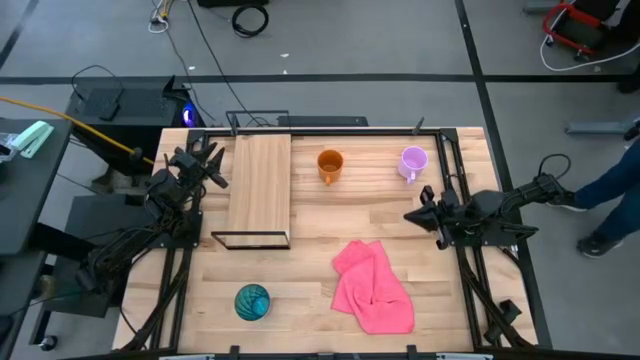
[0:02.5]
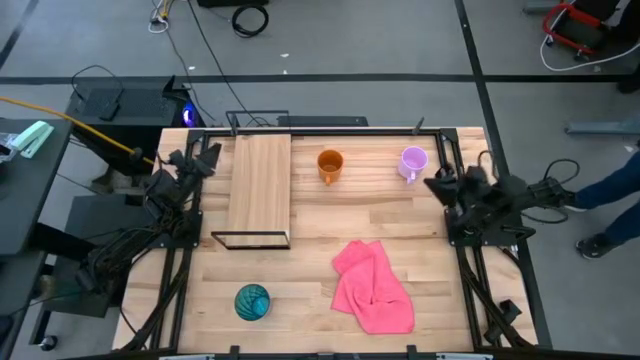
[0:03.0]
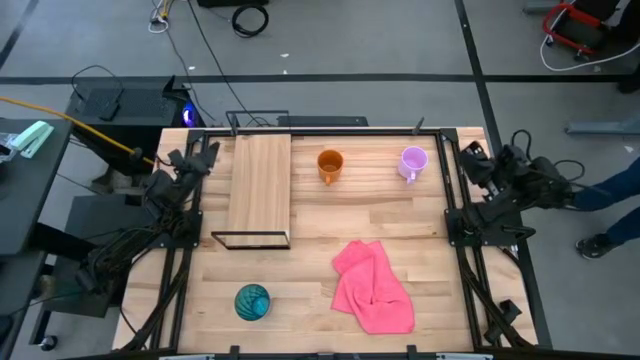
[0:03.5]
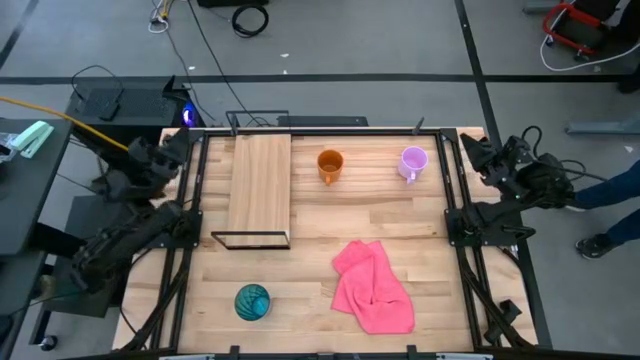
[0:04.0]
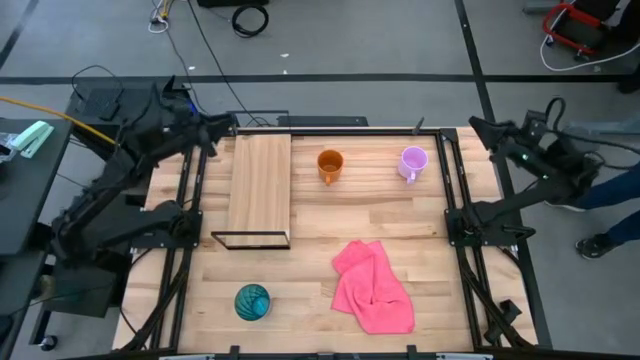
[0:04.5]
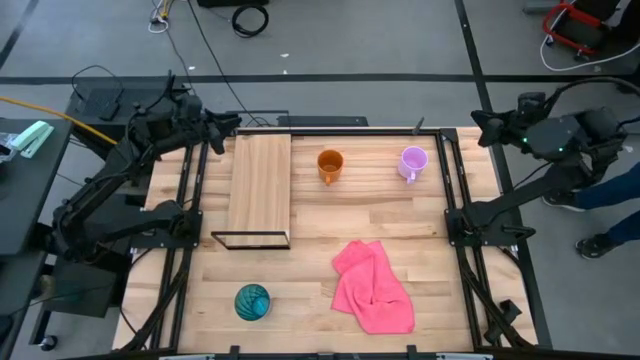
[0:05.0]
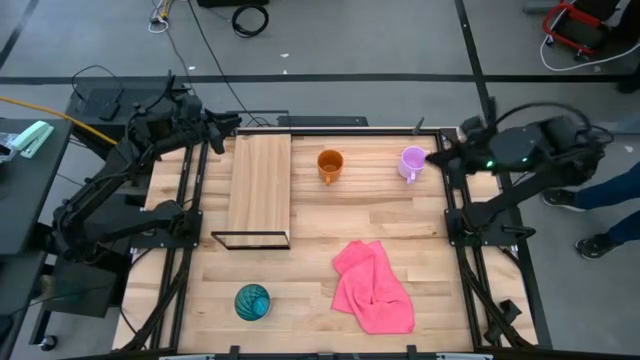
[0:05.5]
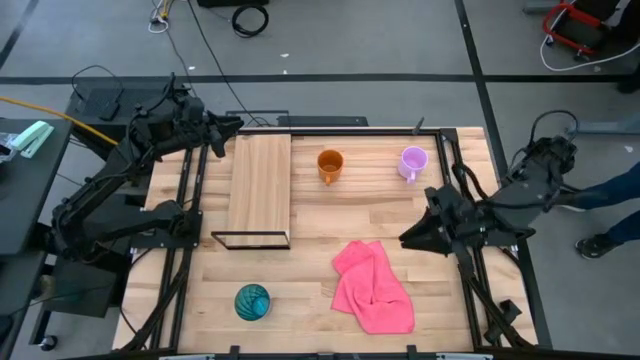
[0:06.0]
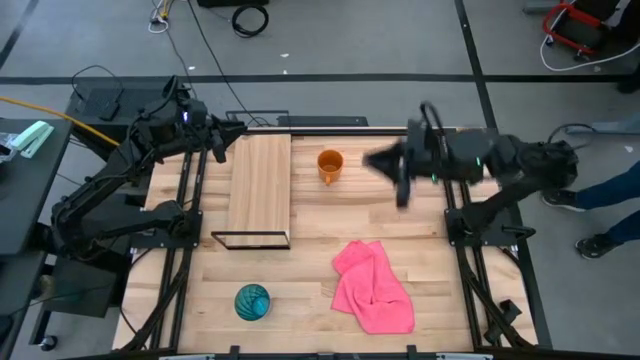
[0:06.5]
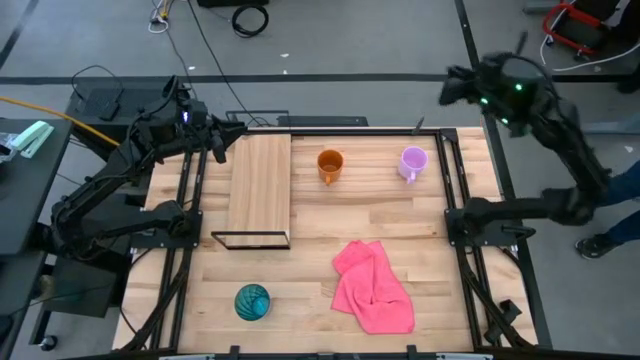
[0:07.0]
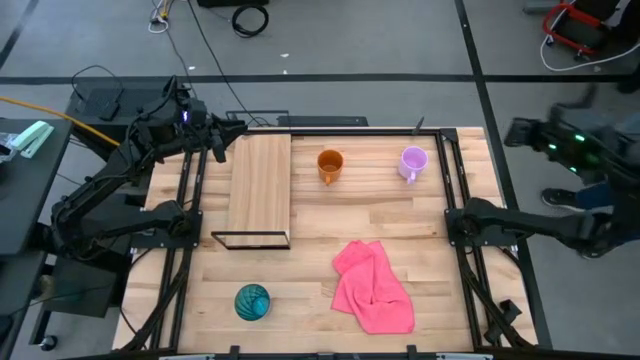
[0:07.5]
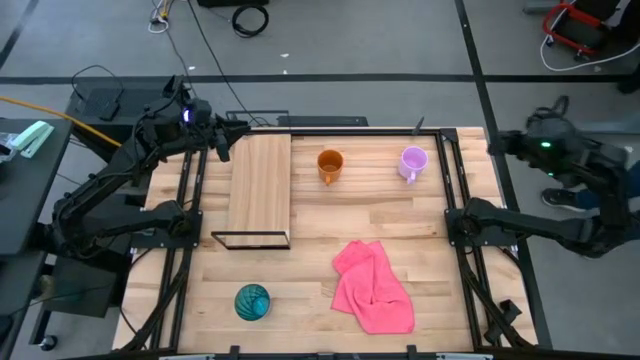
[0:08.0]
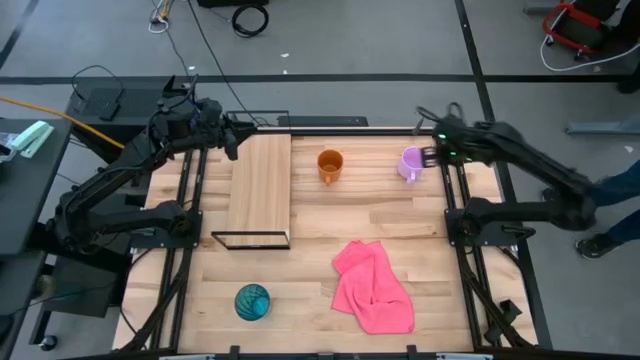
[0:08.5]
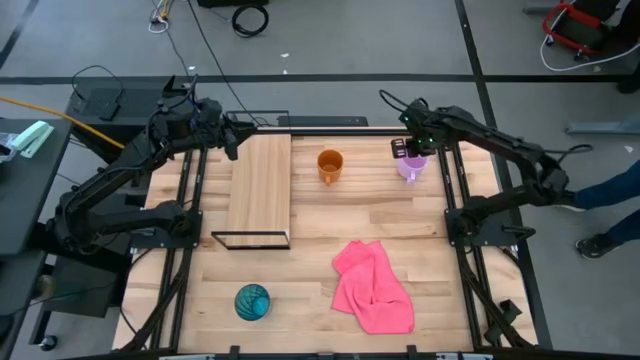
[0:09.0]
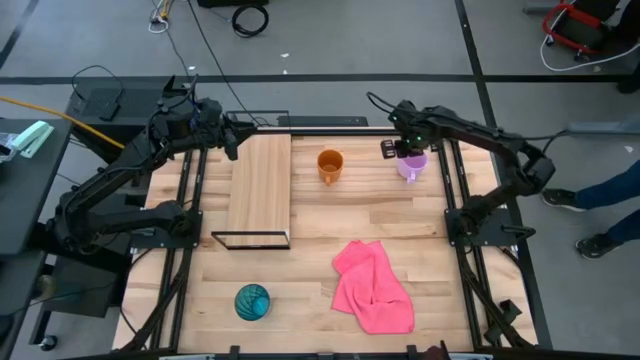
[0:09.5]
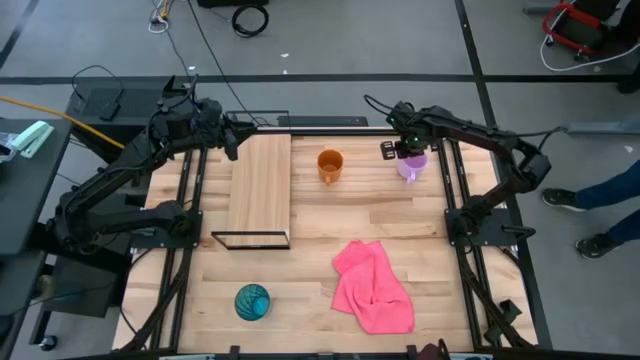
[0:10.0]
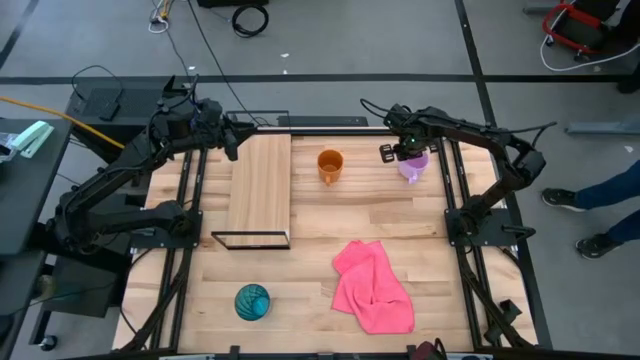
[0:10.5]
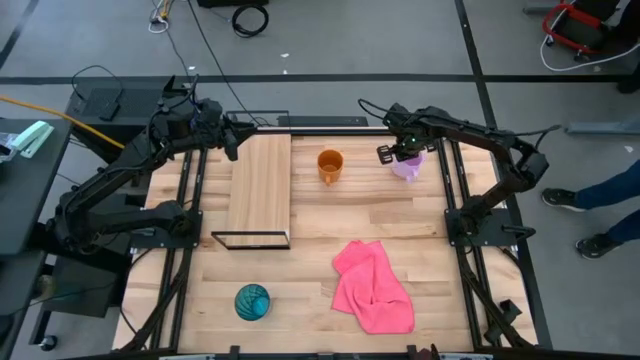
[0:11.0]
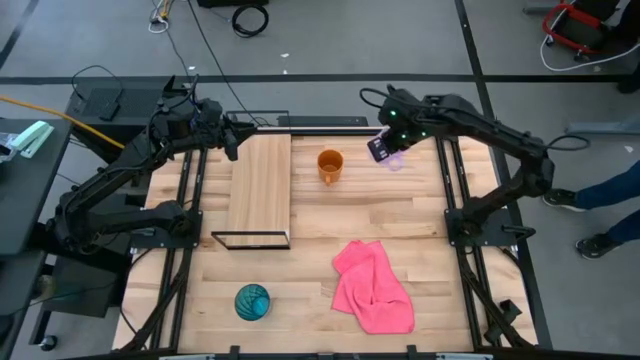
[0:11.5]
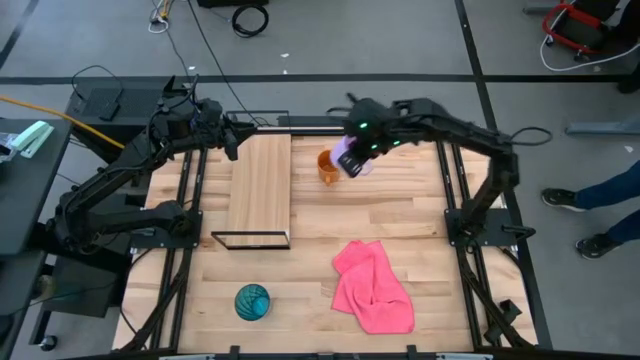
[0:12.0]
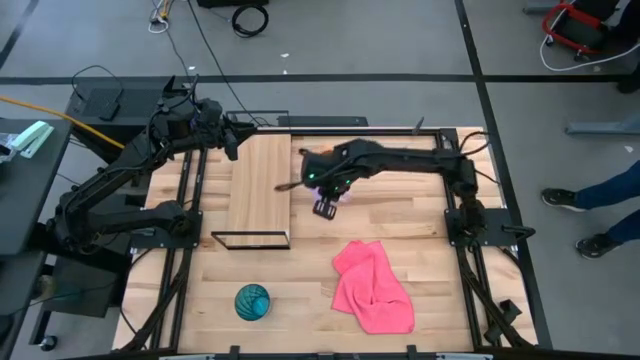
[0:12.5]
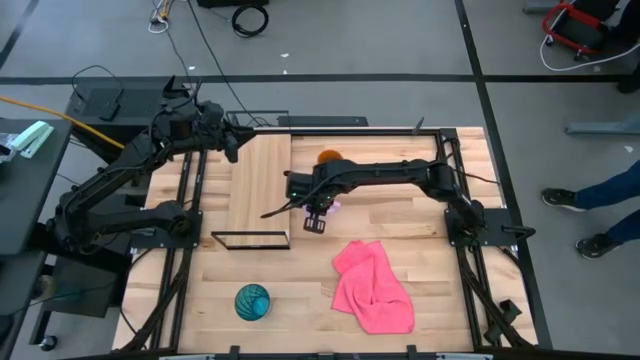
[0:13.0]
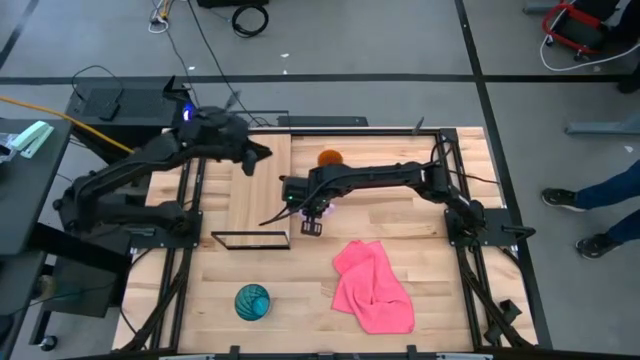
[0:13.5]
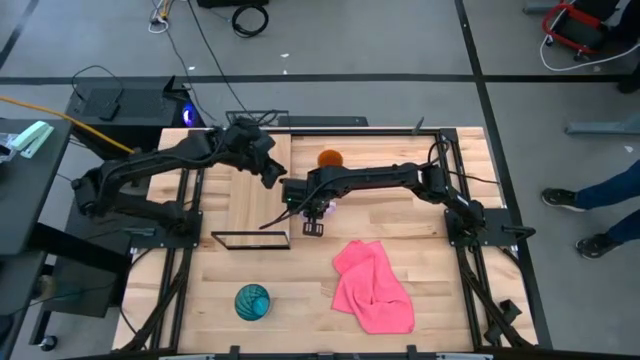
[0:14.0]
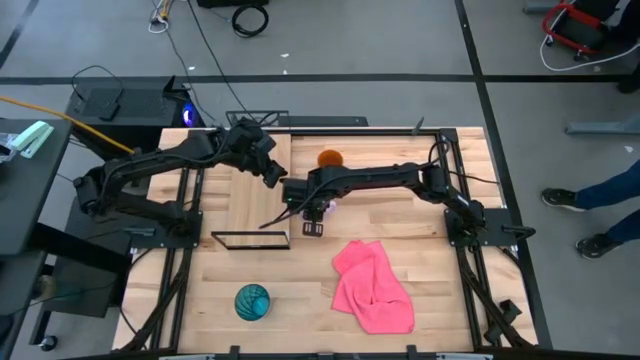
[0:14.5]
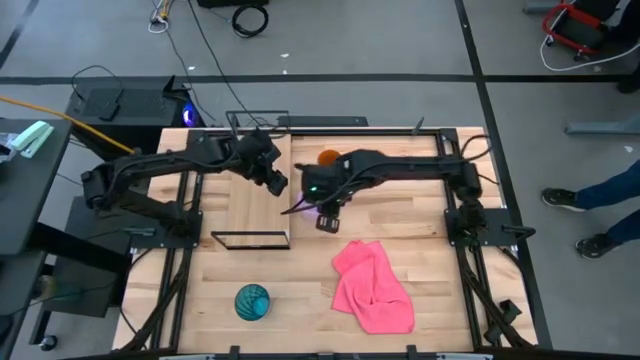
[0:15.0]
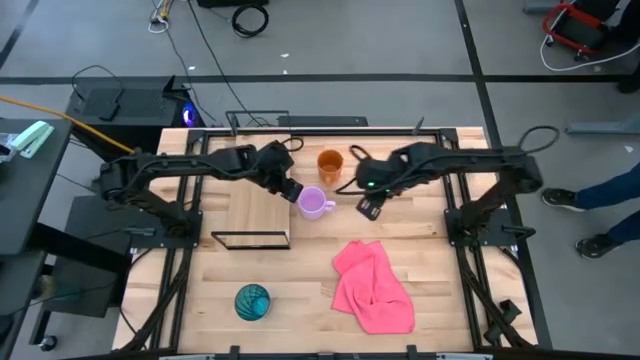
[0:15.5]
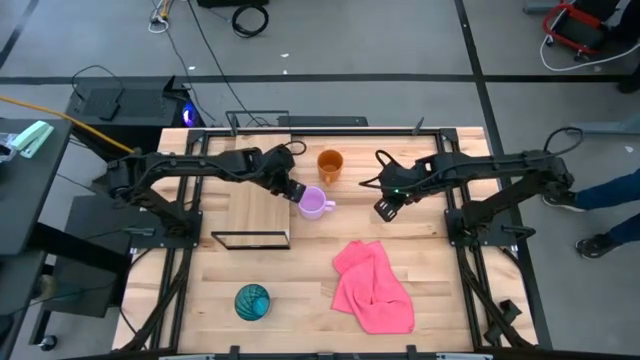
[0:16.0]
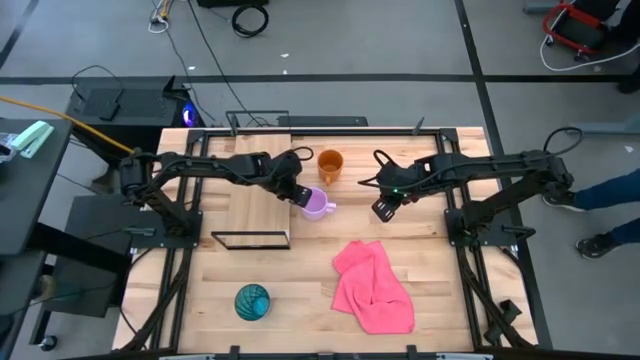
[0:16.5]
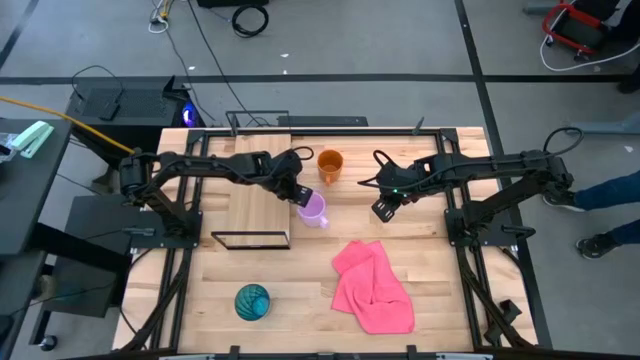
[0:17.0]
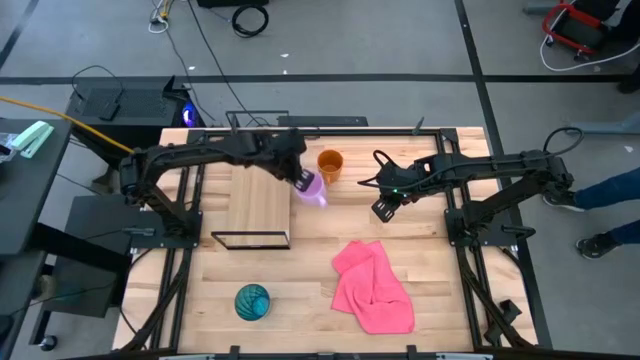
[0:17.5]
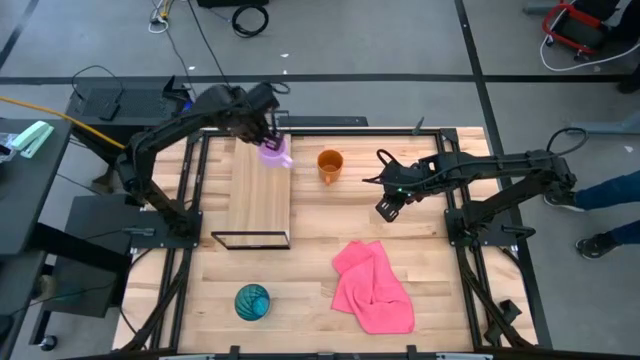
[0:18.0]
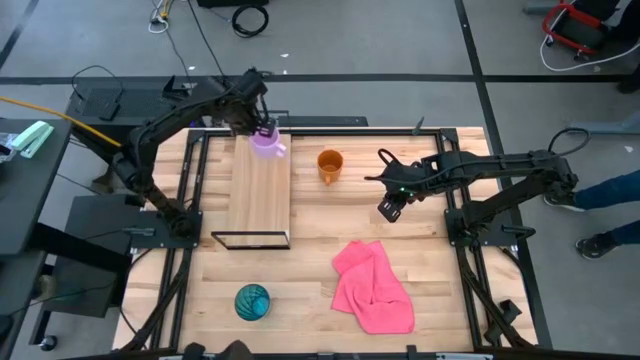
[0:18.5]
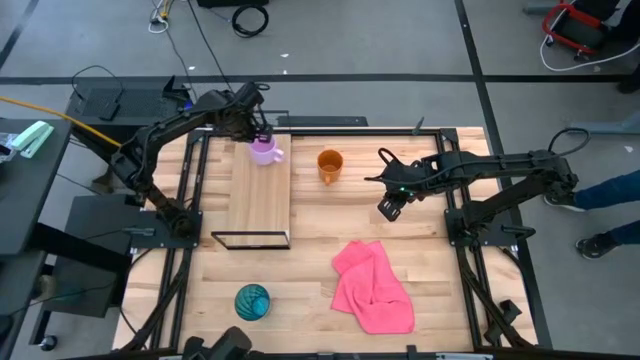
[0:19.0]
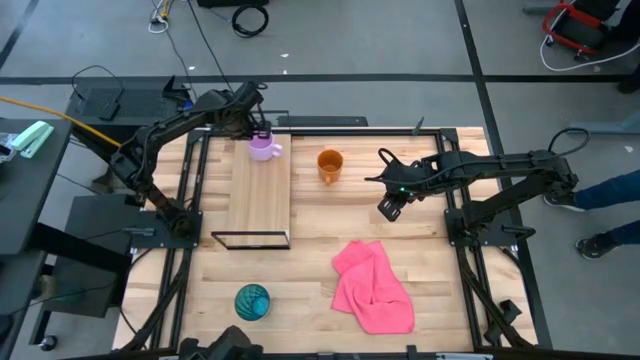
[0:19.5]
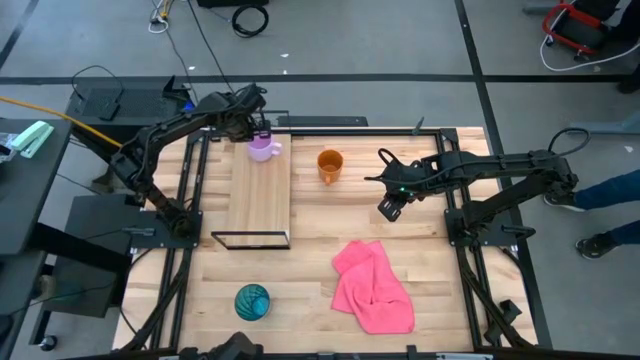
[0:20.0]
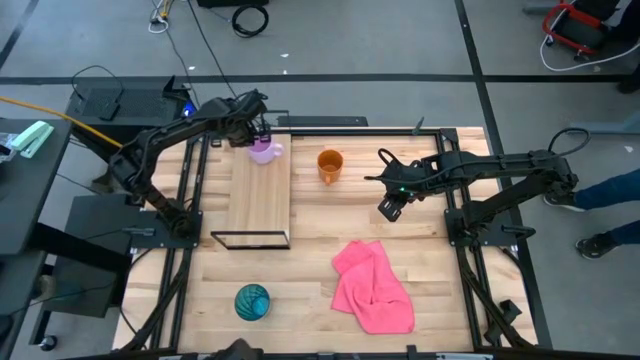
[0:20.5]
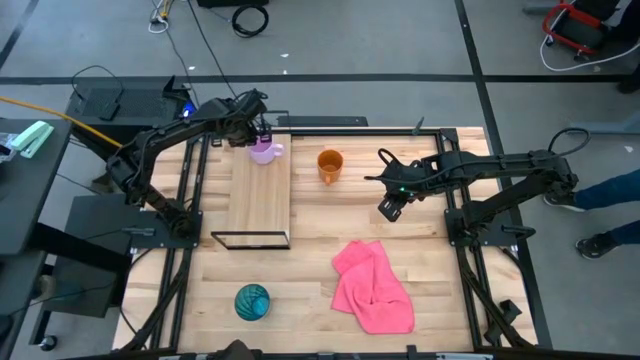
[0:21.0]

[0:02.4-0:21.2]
Task: Stack small to large cups/mugs on shelf
Put the purple mug on the shelf
